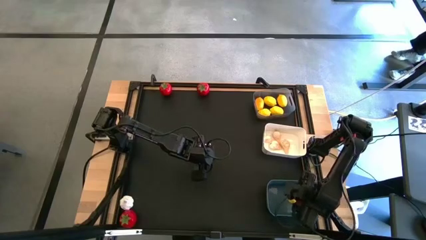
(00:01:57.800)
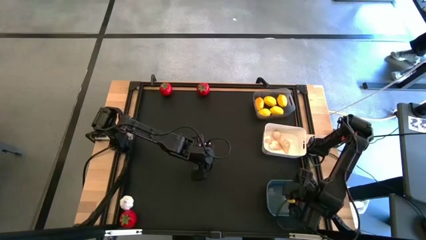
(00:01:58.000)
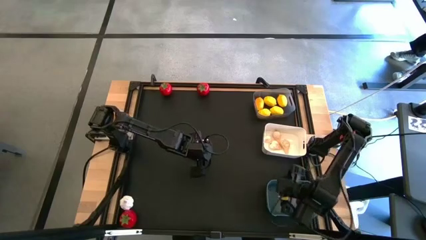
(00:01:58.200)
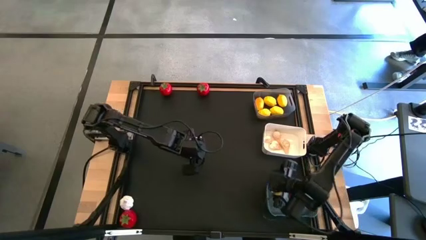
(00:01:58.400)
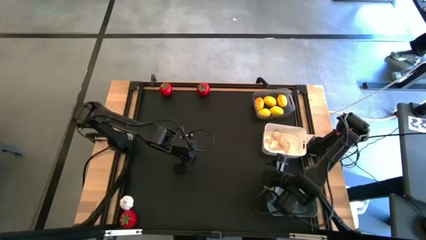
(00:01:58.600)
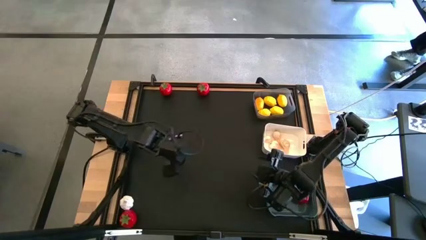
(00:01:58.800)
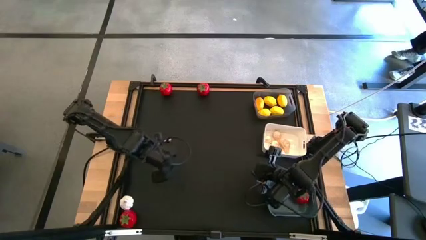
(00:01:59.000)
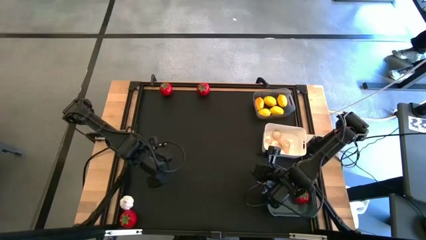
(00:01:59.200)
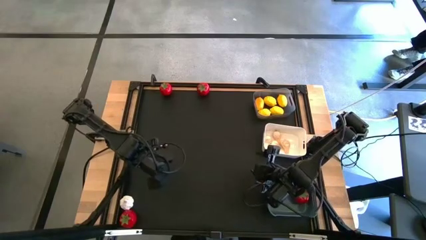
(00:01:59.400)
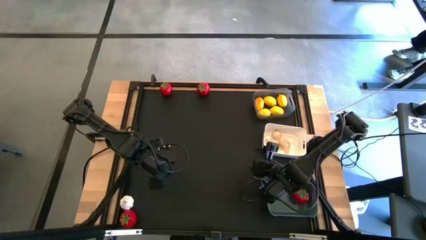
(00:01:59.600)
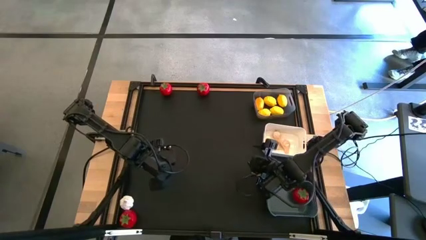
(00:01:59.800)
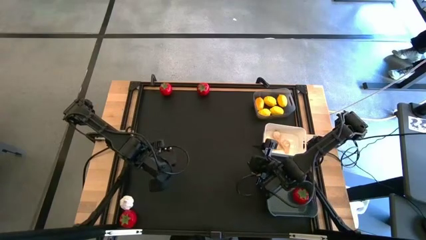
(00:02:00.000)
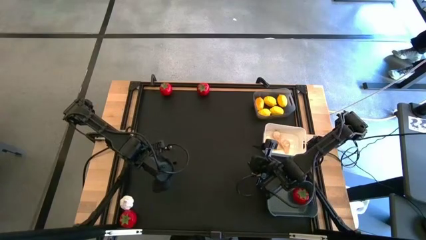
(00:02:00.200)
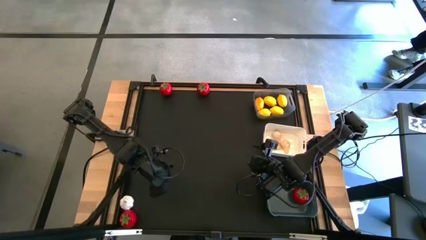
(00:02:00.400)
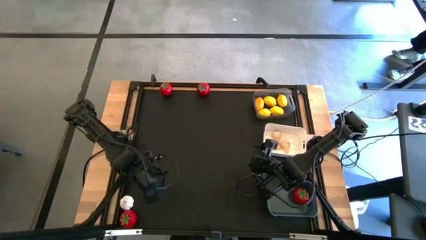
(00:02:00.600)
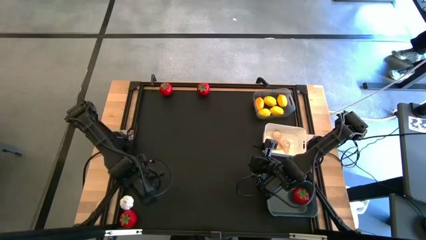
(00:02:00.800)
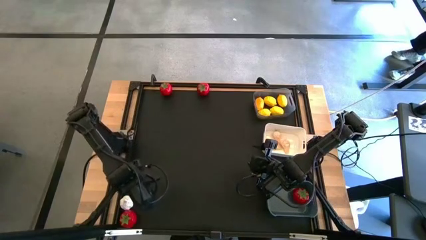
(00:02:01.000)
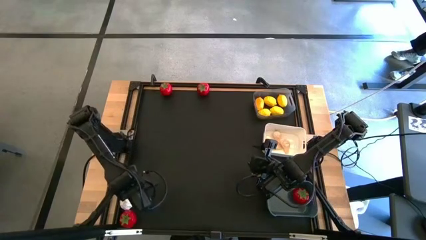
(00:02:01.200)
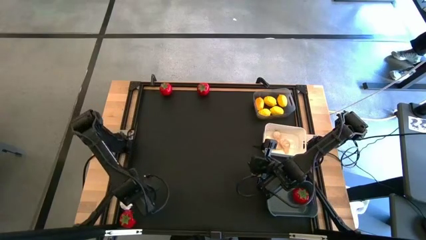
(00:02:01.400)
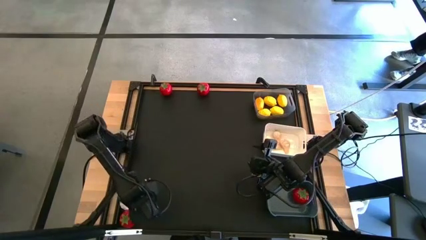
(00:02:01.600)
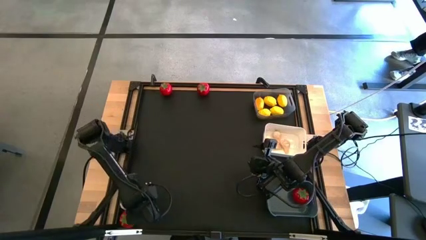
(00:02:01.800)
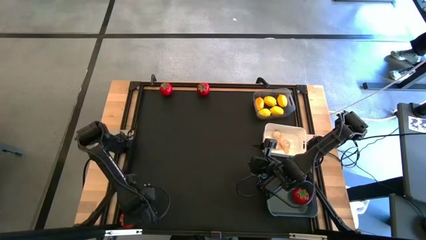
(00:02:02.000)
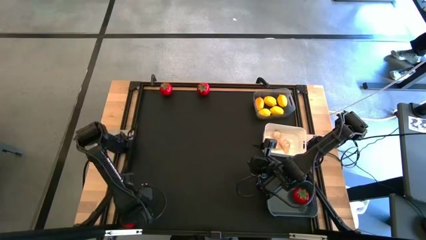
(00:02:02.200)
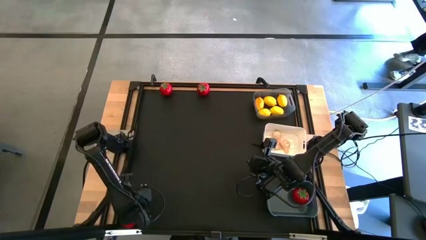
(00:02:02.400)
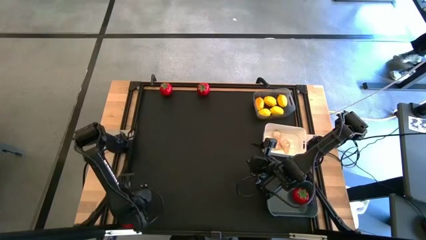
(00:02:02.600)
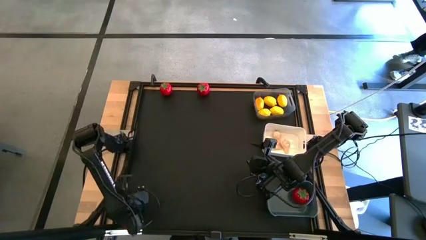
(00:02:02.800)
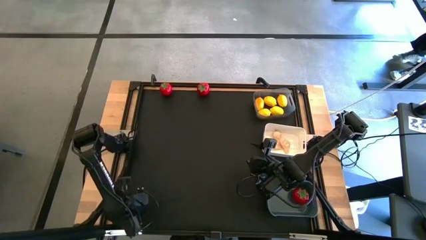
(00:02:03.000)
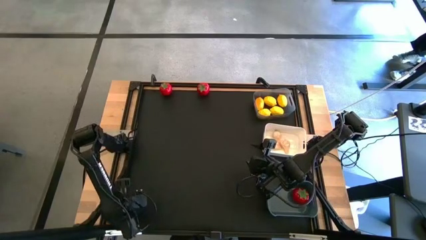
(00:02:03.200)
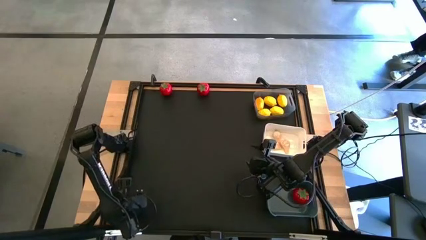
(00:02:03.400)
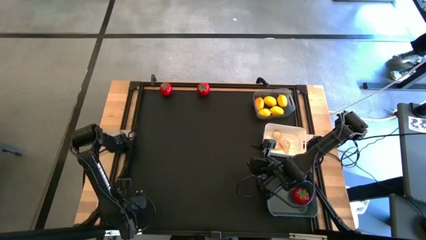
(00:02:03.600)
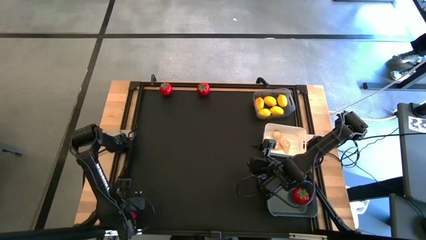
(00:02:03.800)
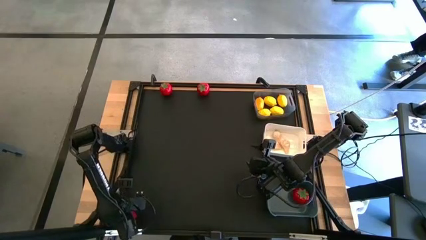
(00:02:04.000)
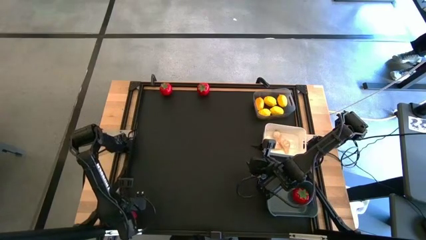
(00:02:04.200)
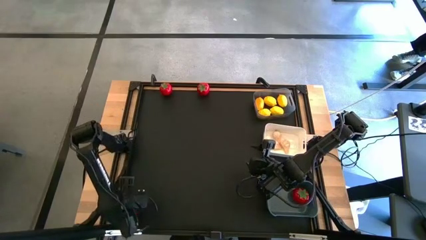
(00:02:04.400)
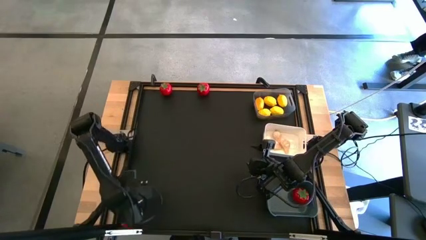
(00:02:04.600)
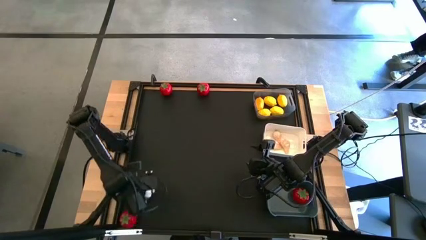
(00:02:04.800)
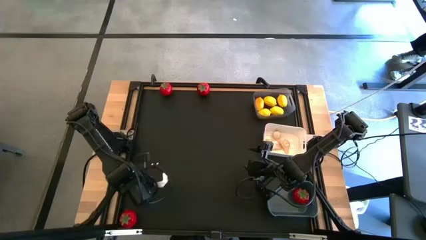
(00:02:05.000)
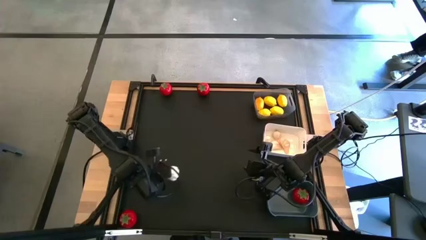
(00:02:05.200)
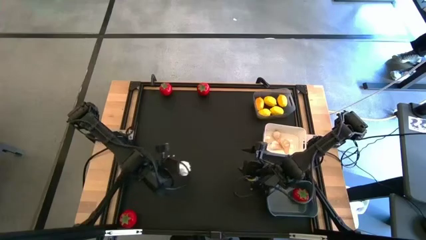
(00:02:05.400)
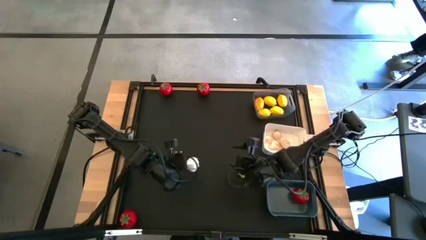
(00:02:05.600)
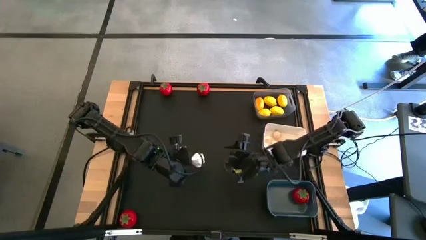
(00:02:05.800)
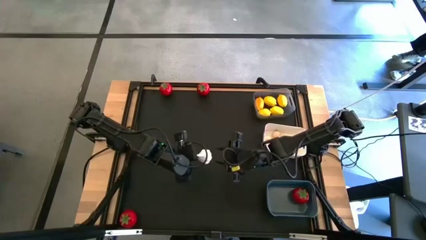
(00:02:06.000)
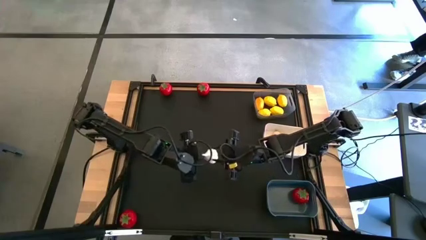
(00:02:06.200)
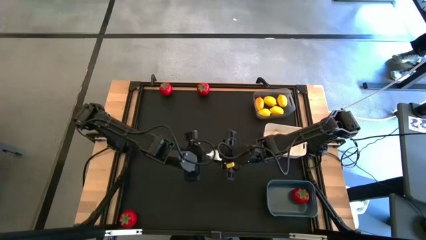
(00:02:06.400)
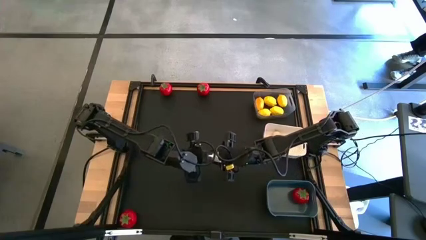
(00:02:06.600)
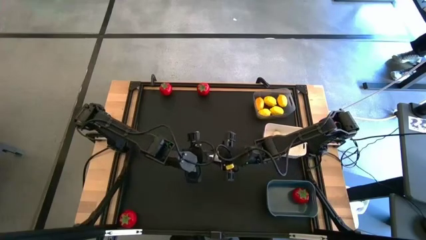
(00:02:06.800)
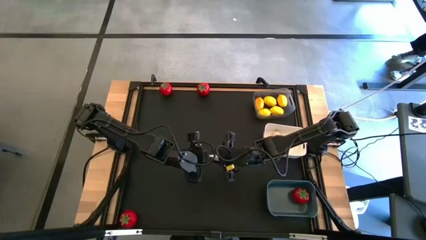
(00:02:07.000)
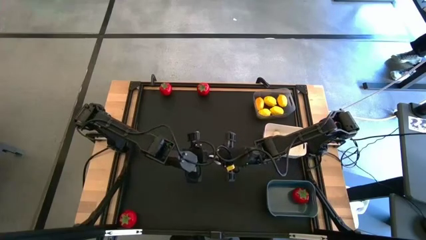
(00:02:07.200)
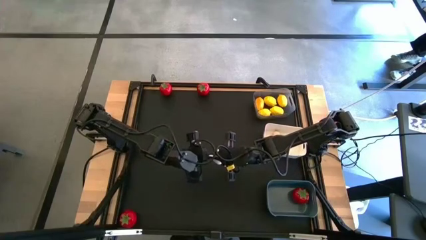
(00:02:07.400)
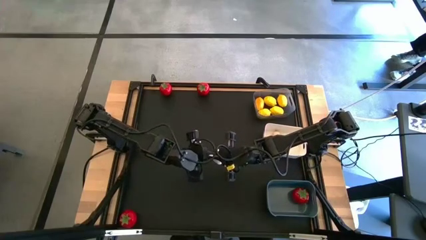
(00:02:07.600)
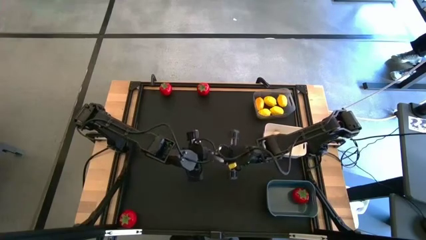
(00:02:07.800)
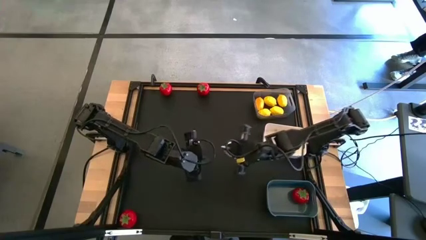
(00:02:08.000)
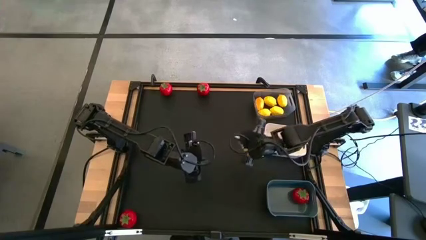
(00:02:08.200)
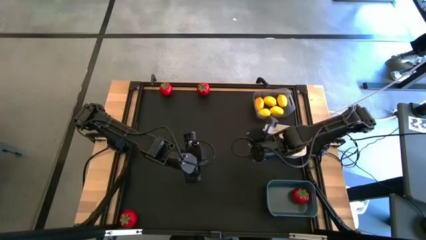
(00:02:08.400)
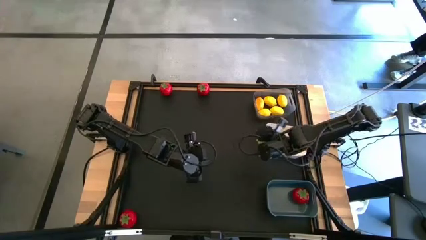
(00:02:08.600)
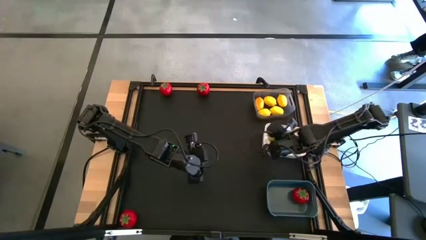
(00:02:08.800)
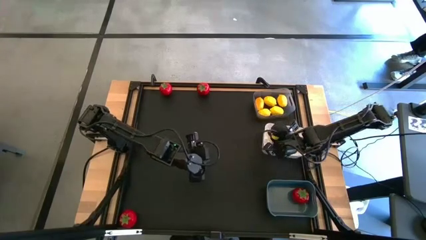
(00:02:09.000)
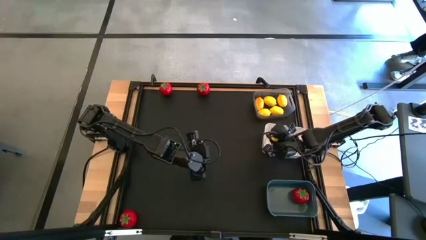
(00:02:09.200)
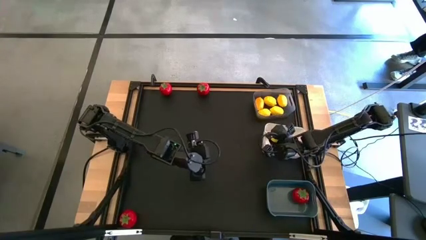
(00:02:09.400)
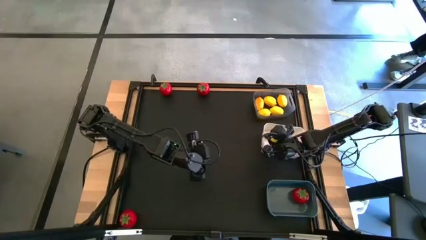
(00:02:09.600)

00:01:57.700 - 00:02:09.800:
Task: Sort produce into baskets
Put the garlic into the white bin

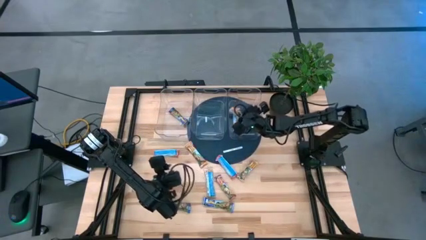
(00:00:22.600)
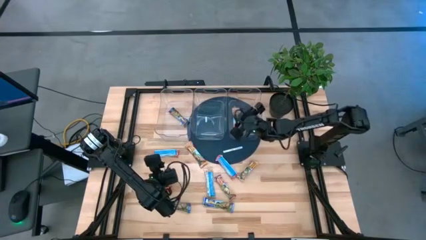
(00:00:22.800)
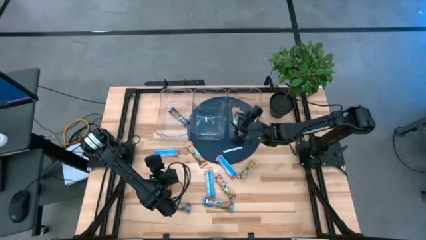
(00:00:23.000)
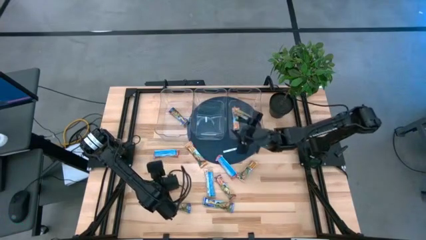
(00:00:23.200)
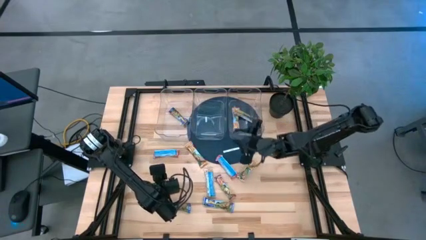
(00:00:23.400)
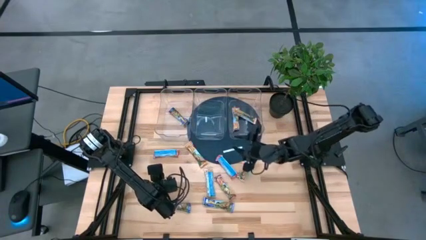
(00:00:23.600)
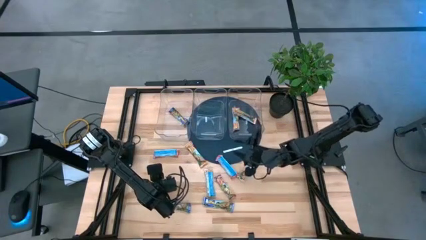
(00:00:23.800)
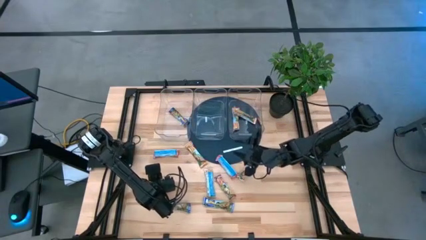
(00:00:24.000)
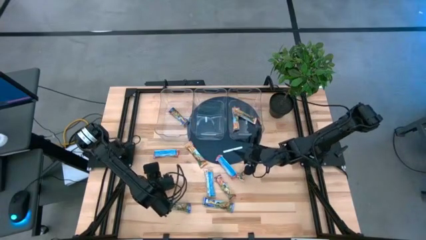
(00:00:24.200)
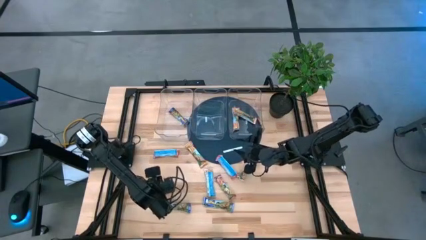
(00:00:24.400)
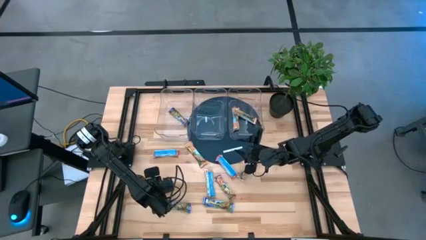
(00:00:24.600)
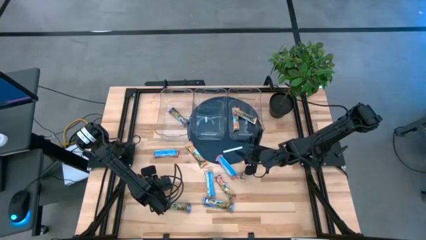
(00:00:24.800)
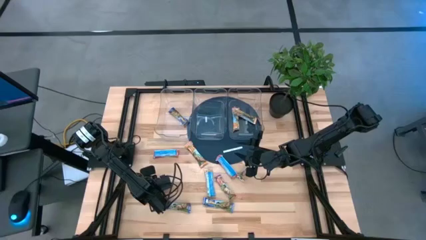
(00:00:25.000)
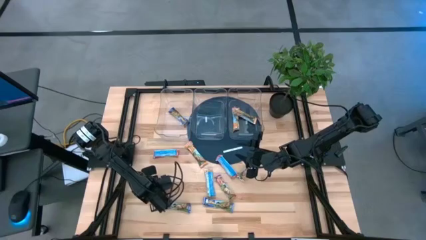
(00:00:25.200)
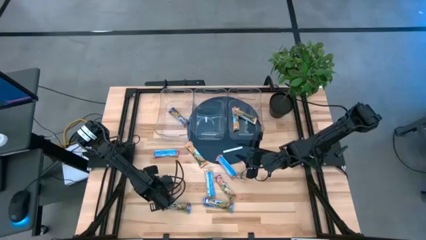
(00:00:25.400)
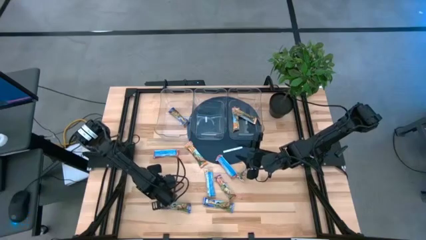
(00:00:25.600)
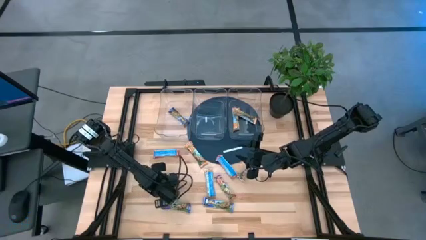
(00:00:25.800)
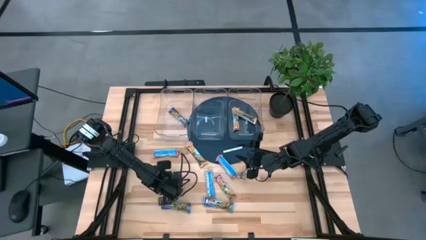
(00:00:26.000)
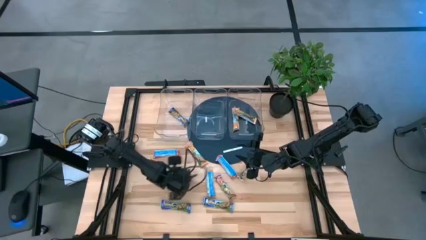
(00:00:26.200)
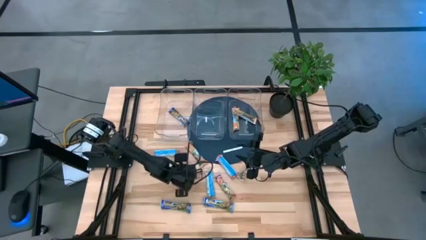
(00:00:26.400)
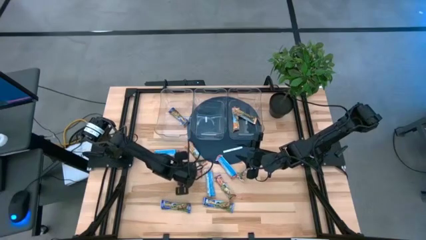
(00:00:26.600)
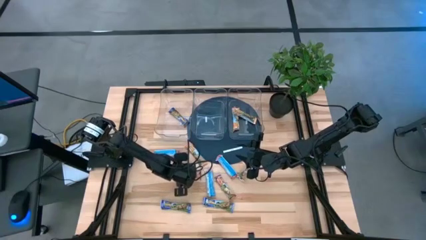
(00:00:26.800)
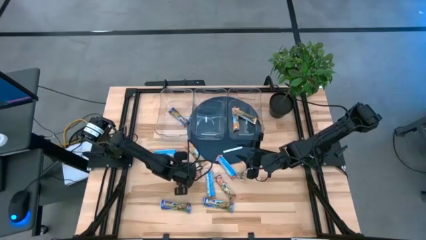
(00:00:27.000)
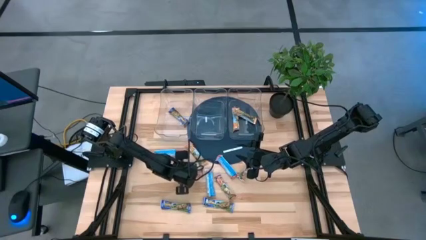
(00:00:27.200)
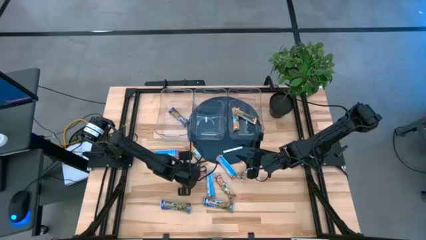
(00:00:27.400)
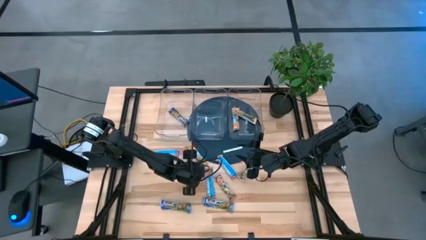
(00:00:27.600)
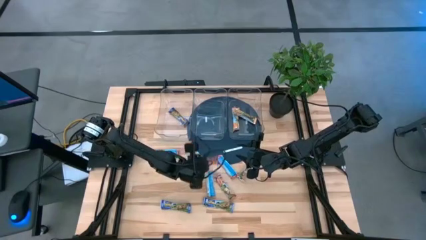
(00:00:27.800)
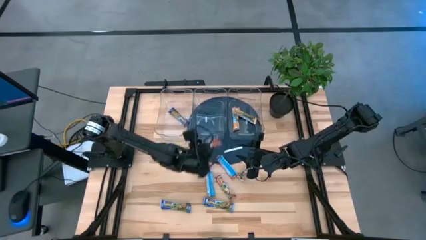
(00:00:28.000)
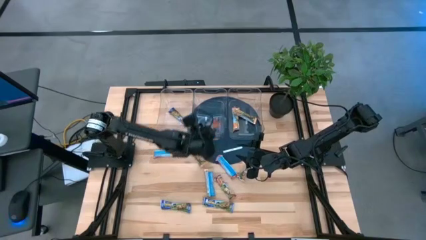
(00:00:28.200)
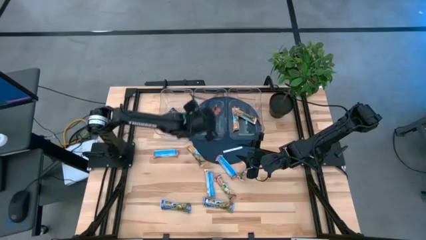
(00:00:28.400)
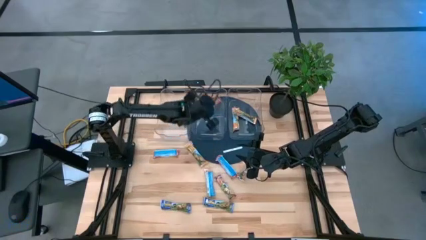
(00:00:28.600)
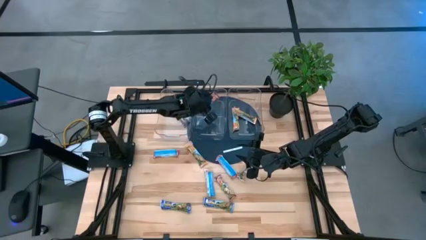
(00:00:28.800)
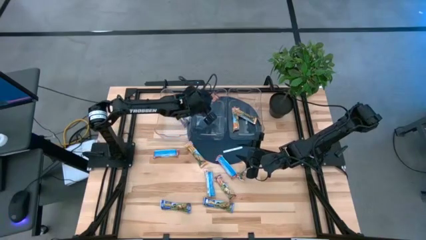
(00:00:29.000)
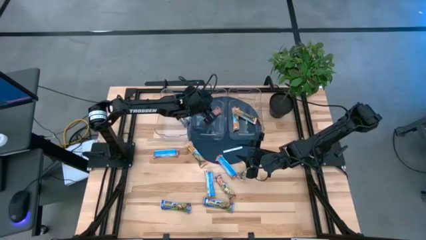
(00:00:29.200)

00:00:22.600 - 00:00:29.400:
Task: Pick and place Granola Bars by type
Put the red granola bar into the middle transparent bin
